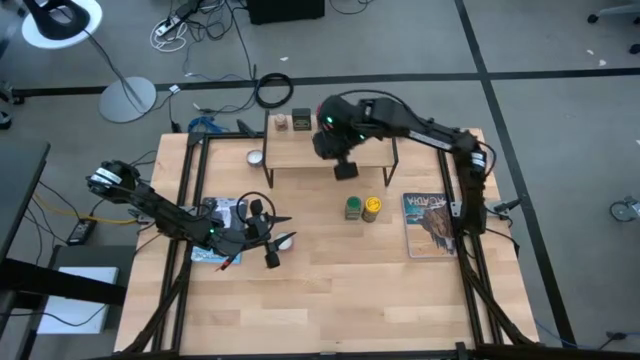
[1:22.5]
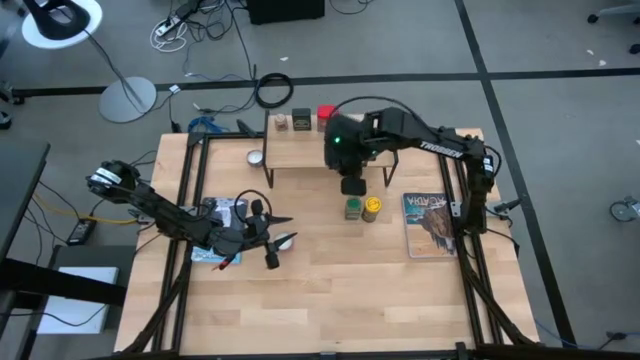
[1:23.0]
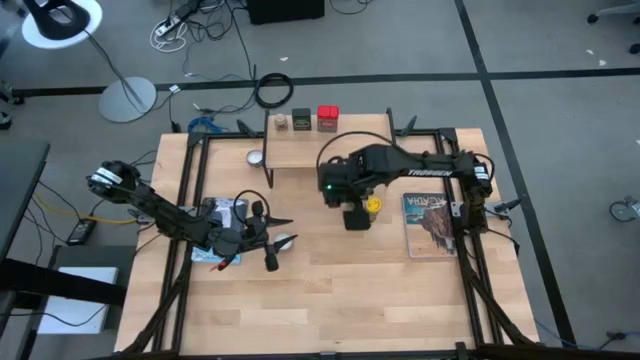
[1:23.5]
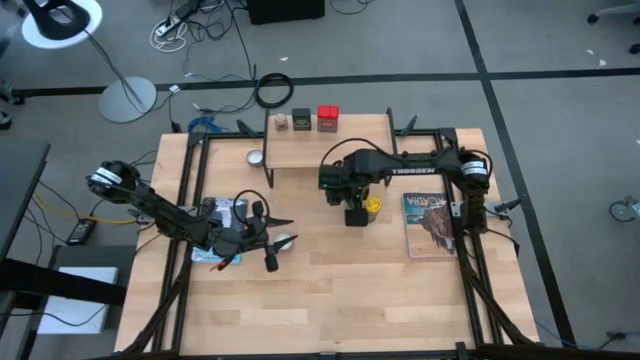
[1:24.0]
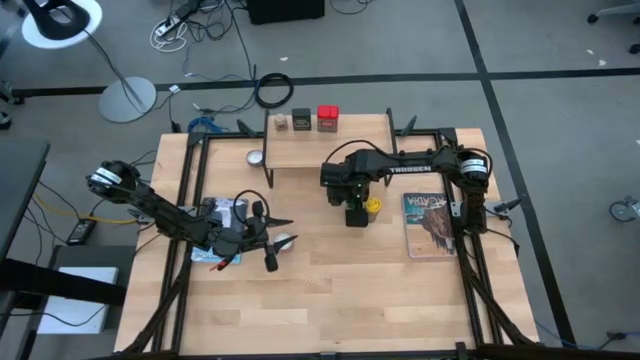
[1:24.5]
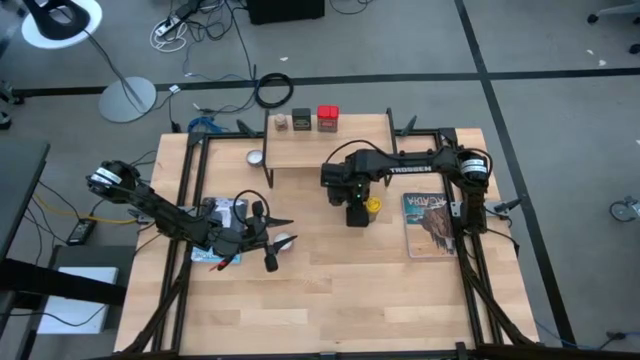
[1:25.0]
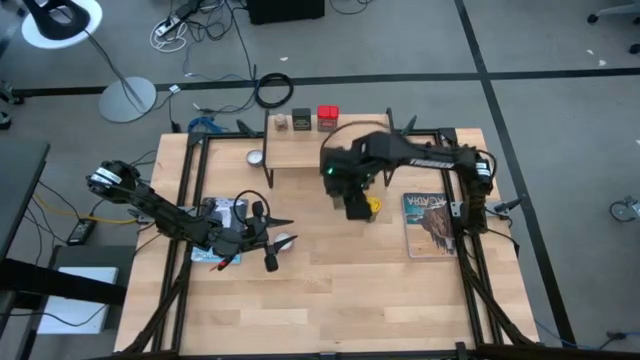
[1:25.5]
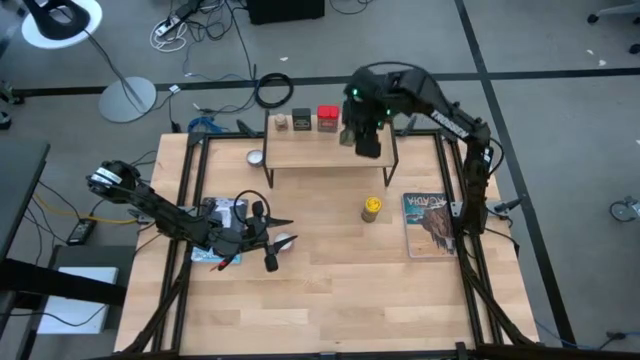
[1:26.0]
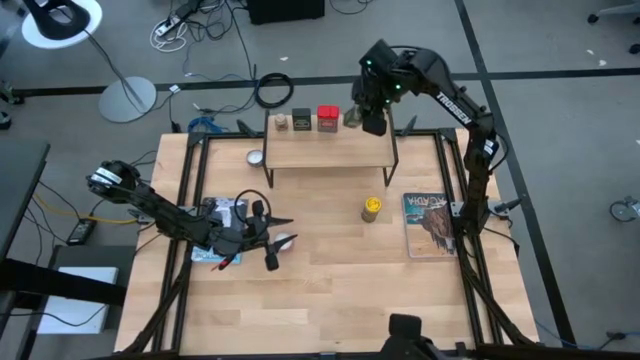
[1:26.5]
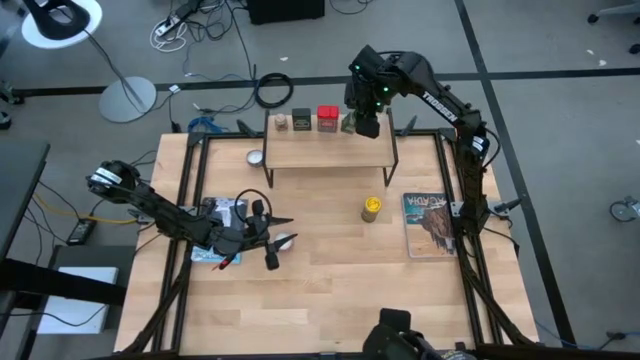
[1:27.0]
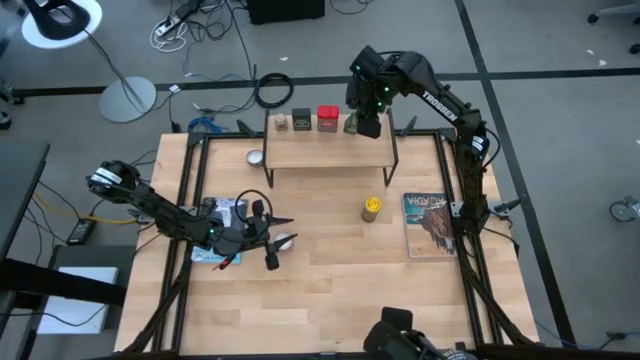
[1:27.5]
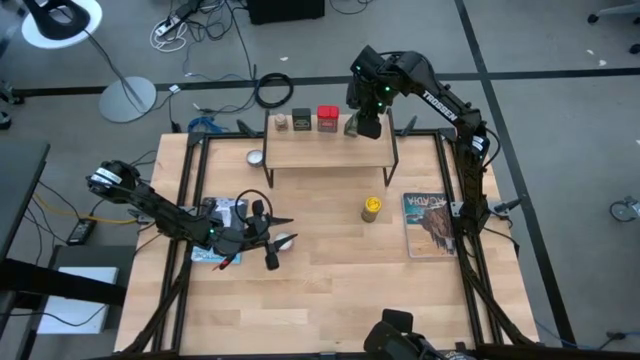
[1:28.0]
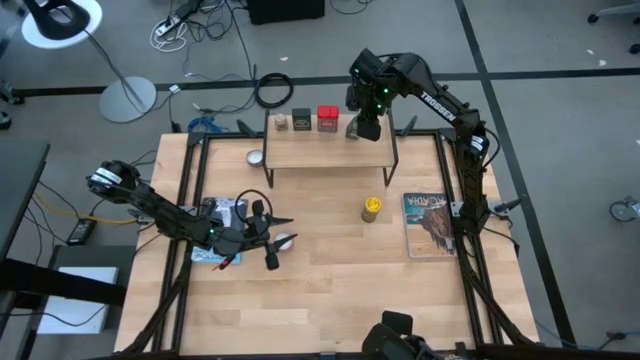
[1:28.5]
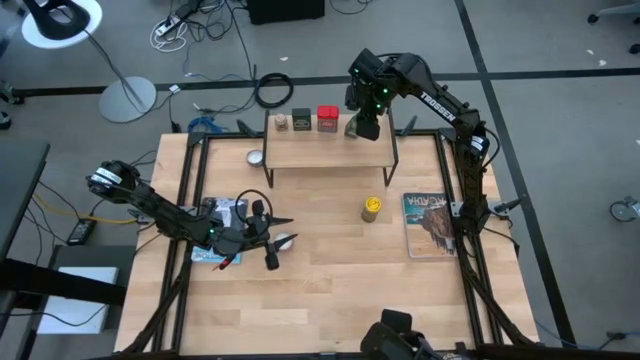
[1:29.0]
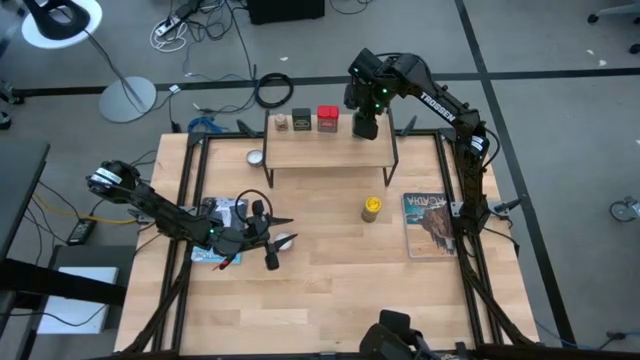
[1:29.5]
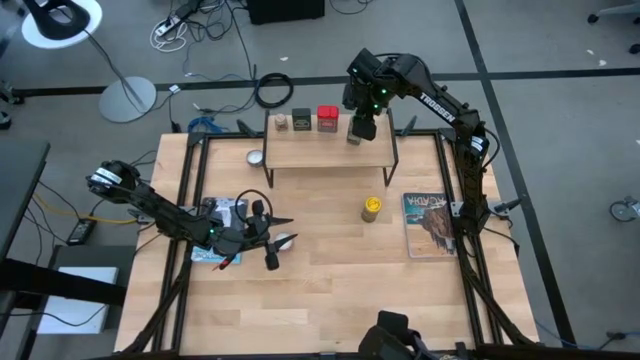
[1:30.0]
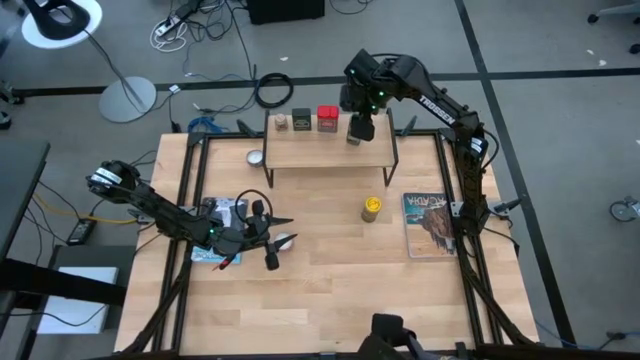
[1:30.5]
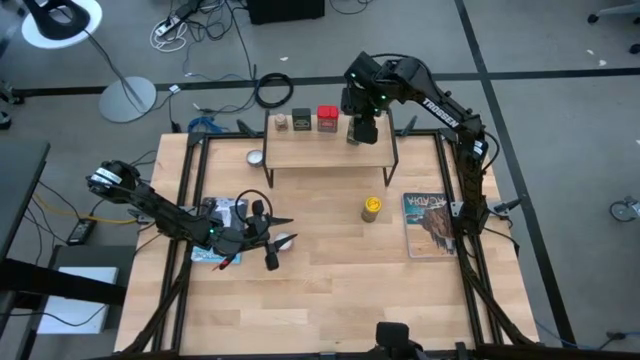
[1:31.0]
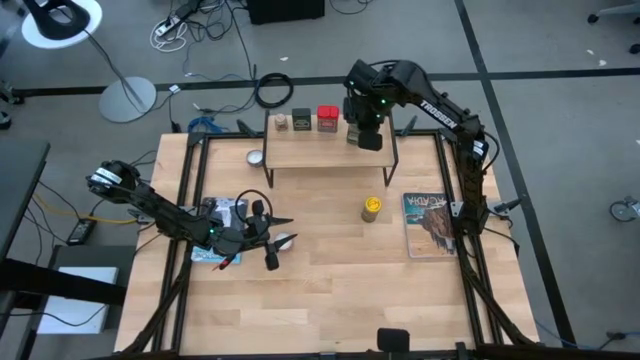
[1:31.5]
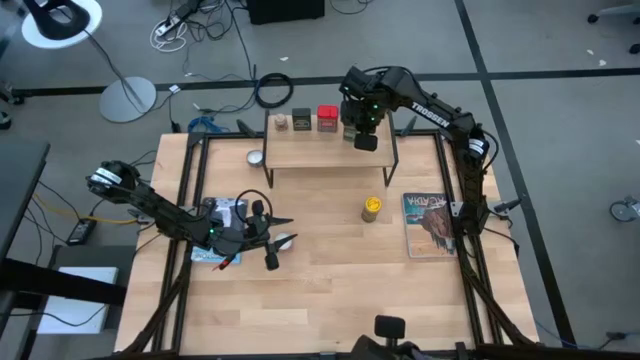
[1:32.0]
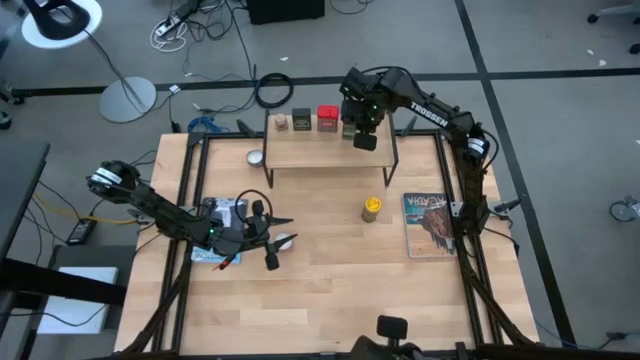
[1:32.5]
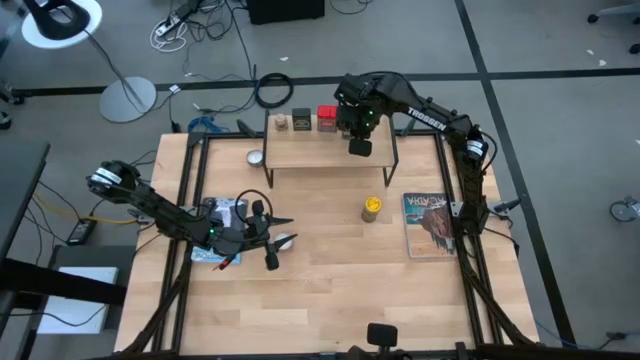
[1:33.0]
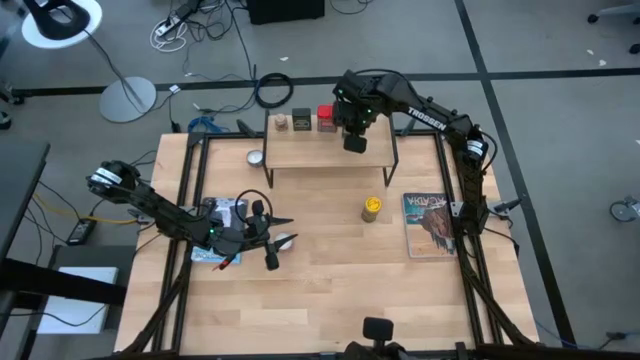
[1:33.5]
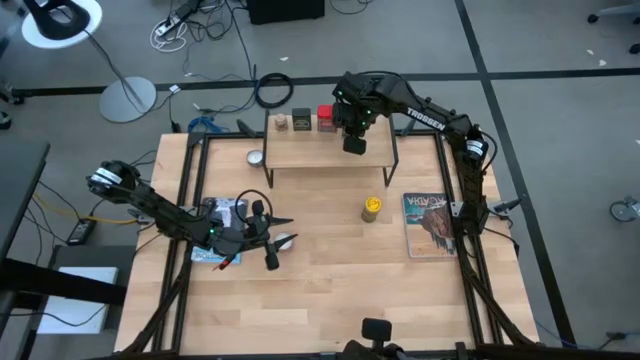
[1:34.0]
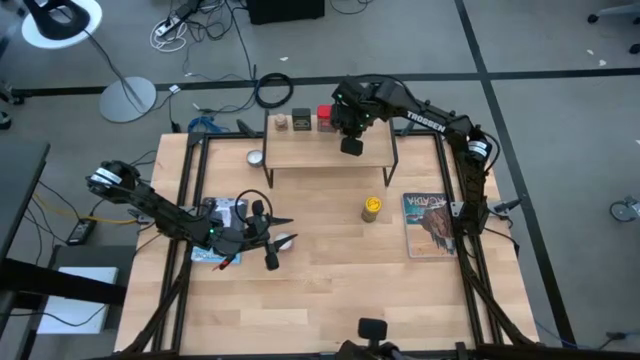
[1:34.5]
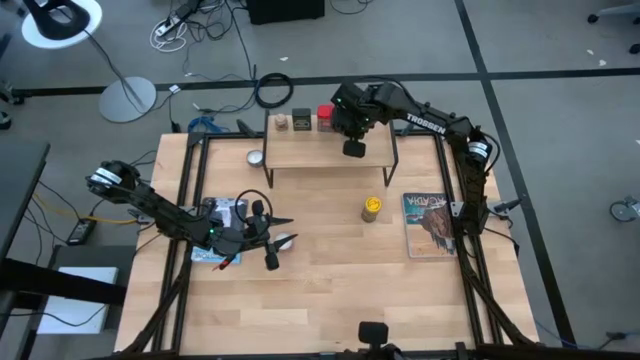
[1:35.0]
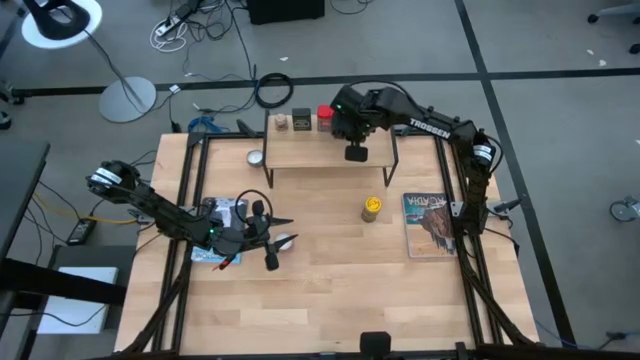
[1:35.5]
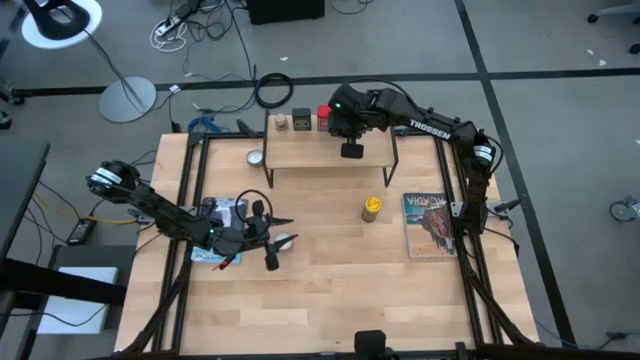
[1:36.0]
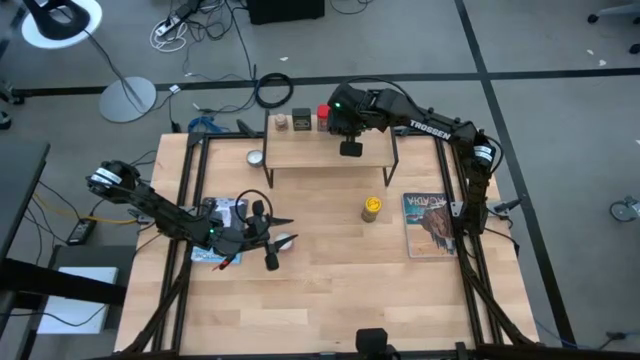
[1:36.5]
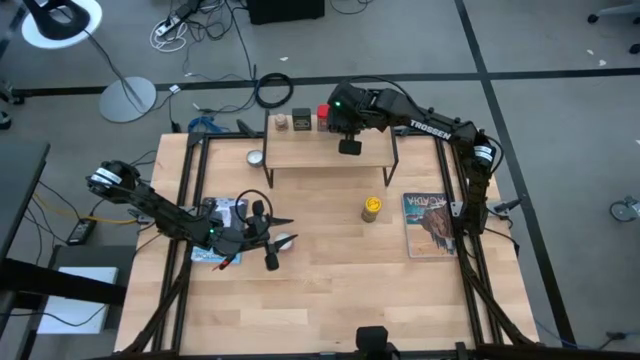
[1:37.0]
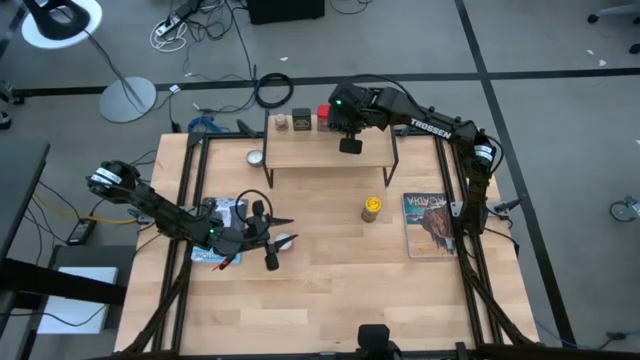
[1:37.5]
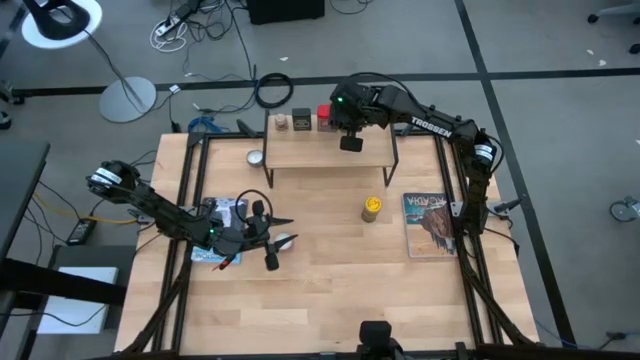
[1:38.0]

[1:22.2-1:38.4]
Task: Shelf spices
Put the green seasoning bottle on the shelf

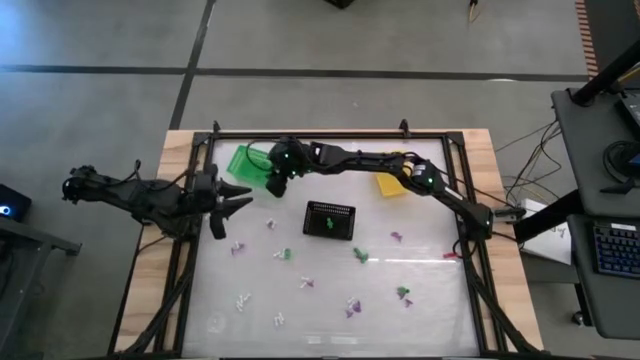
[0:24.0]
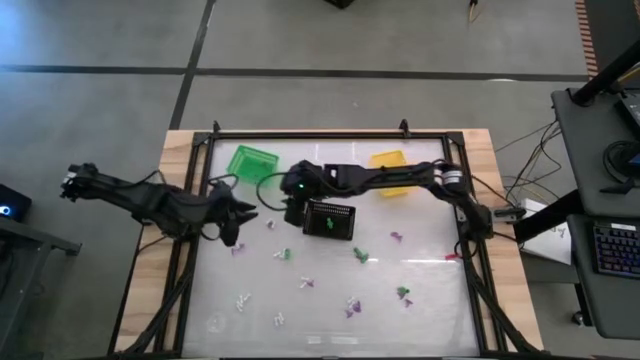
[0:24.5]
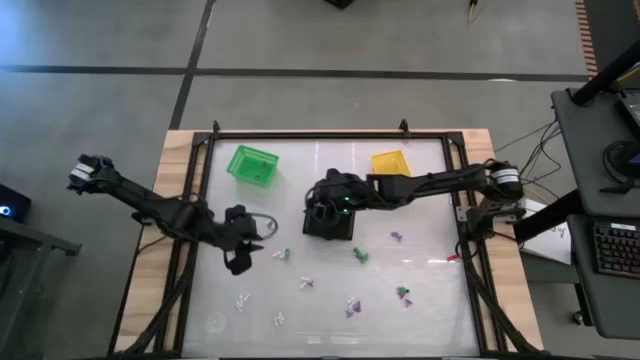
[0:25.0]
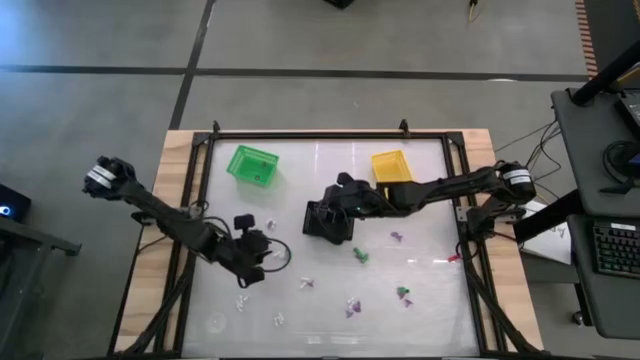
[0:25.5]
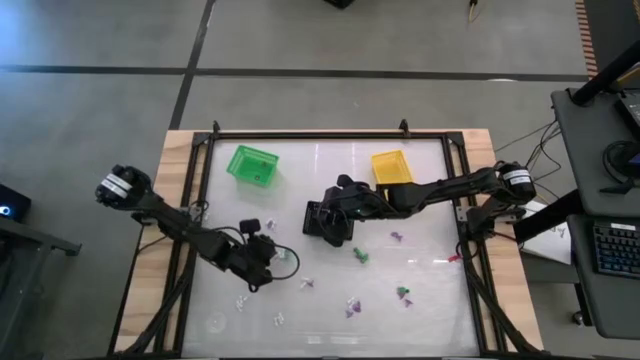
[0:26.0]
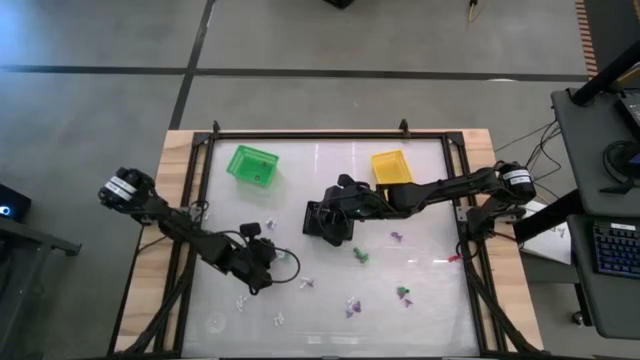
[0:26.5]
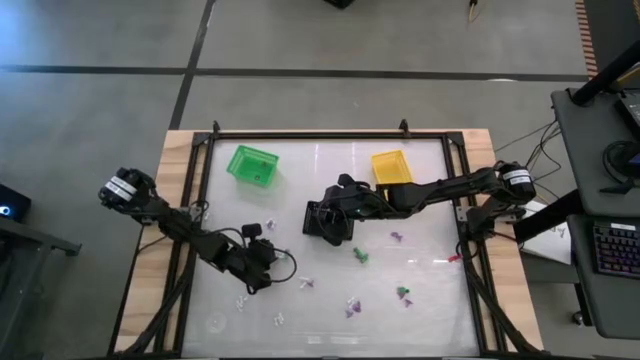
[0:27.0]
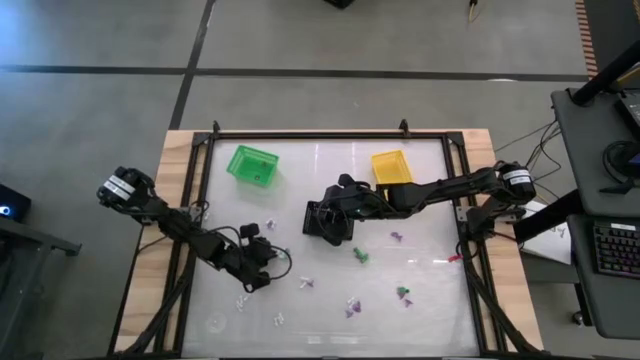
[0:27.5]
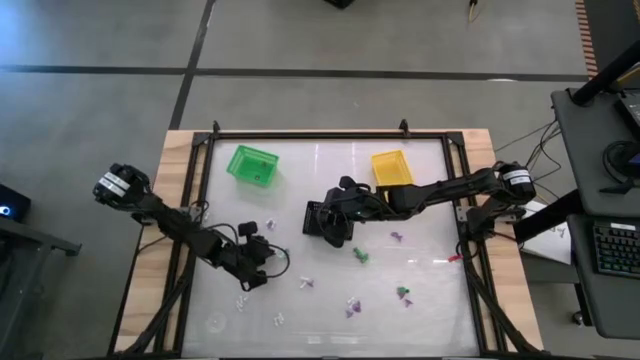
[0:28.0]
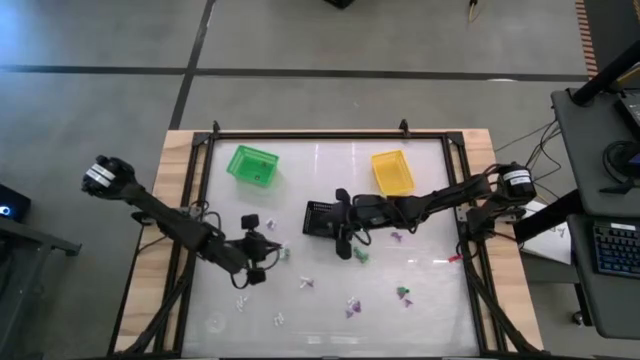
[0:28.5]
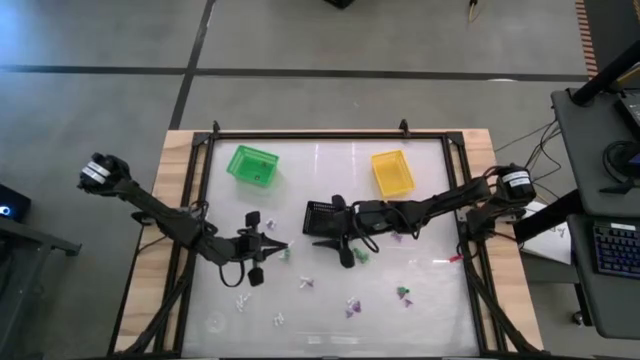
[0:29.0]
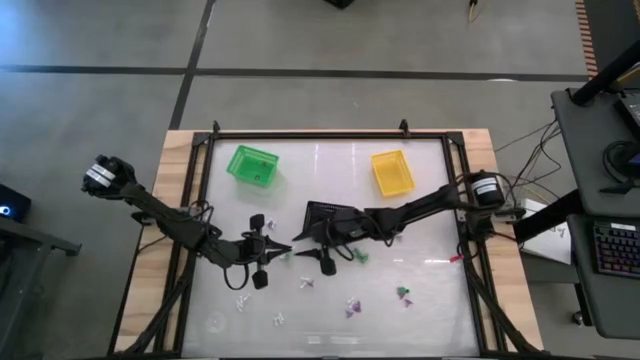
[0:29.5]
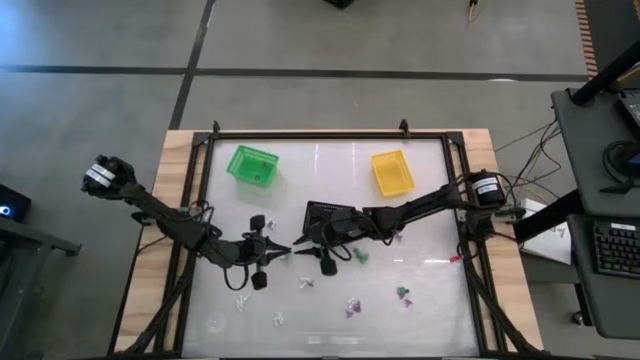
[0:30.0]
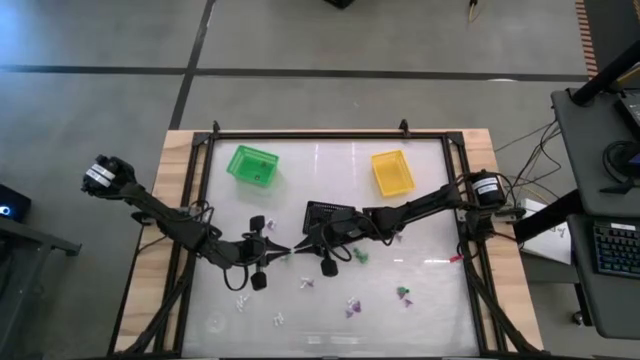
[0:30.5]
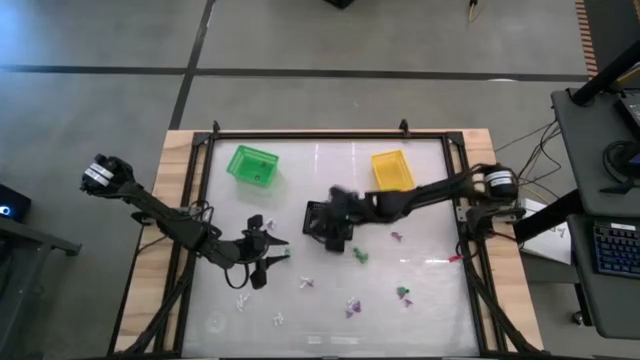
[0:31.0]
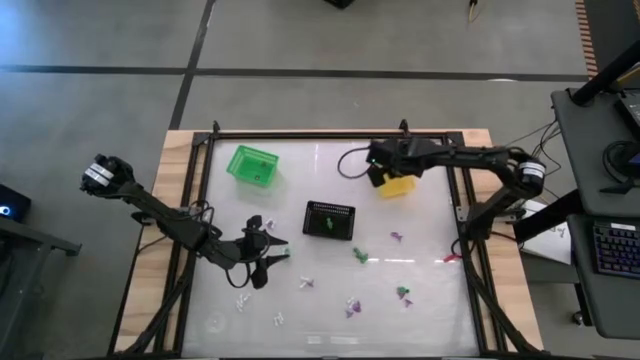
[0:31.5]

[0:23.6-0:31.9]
Task: Sort Halloween decoration
Put the white bone toy into the yellow bin
